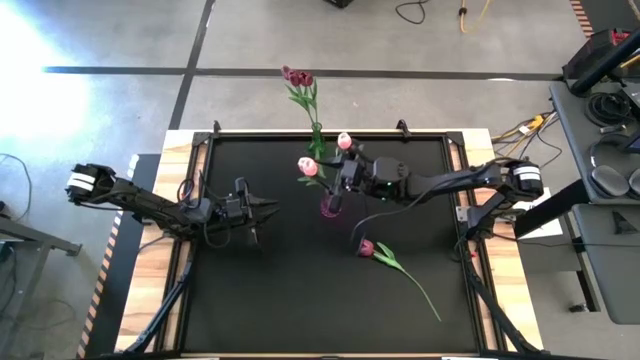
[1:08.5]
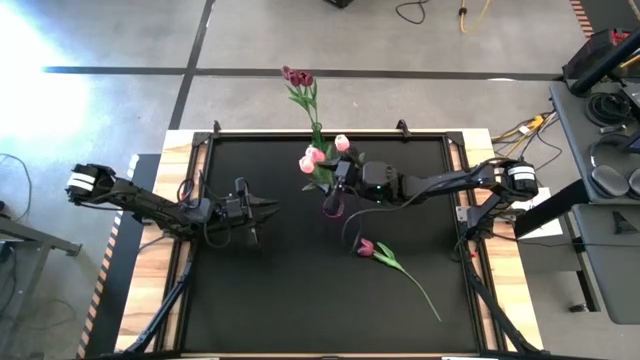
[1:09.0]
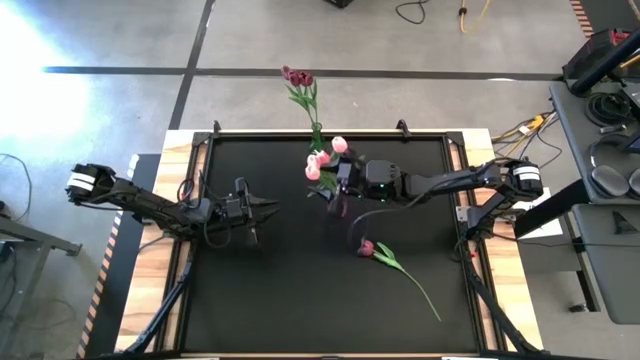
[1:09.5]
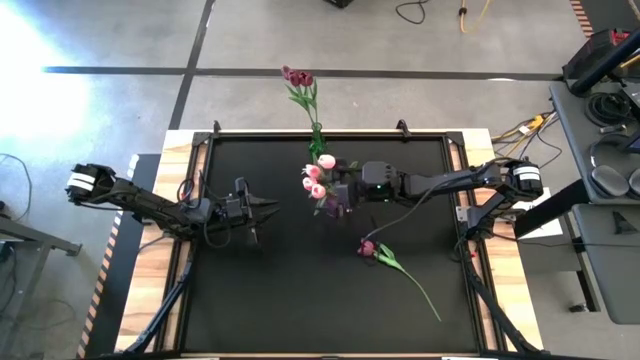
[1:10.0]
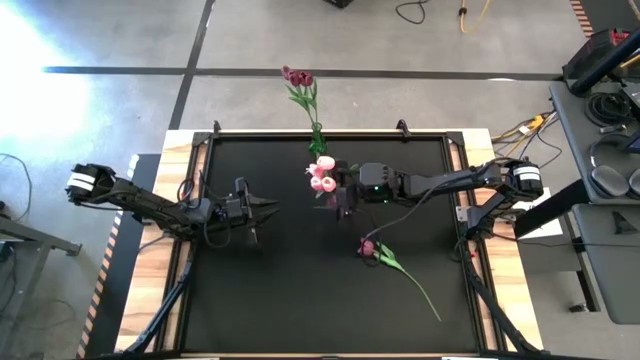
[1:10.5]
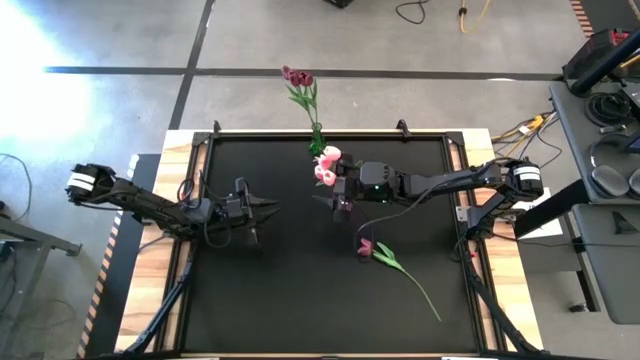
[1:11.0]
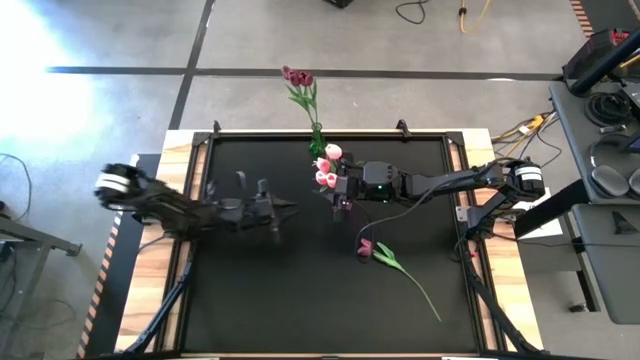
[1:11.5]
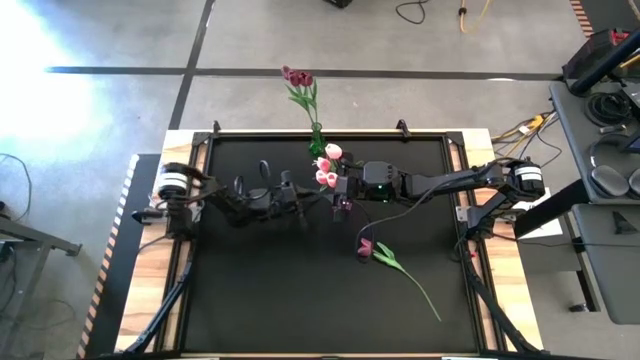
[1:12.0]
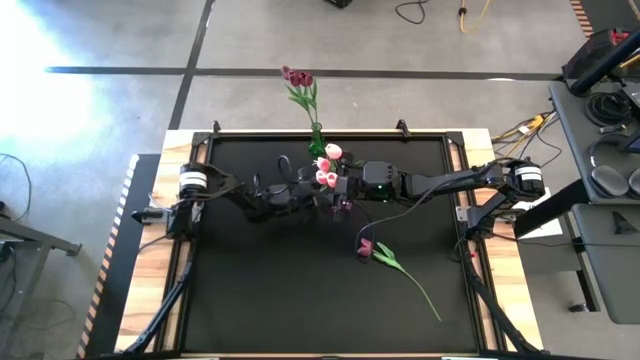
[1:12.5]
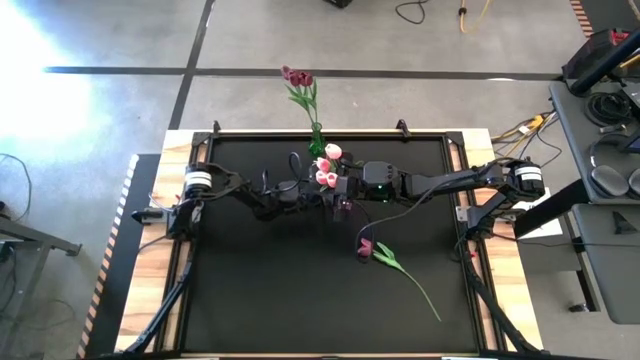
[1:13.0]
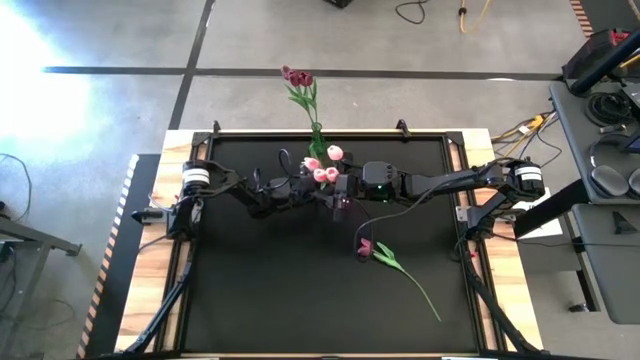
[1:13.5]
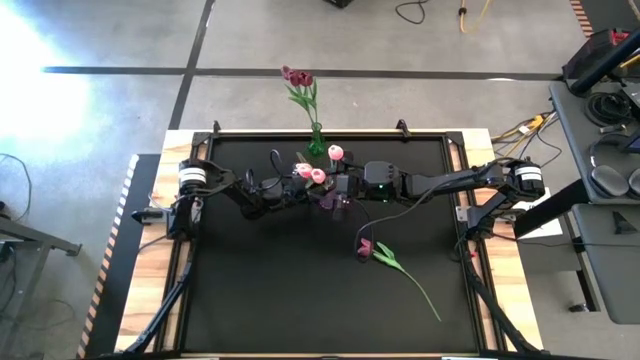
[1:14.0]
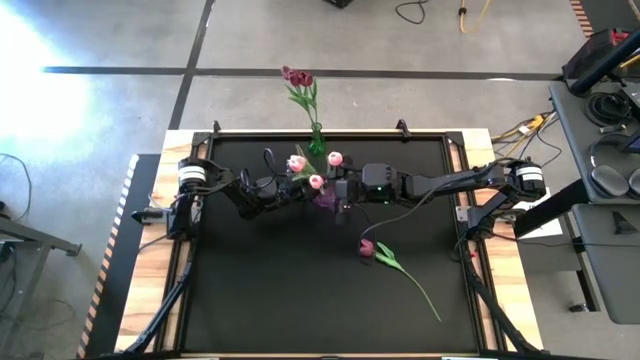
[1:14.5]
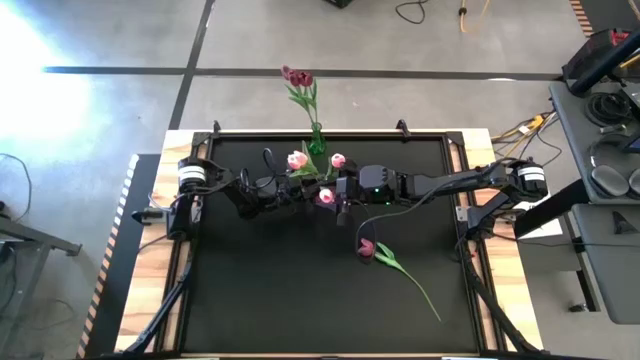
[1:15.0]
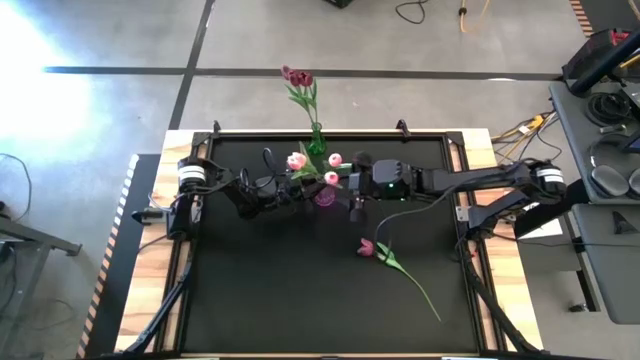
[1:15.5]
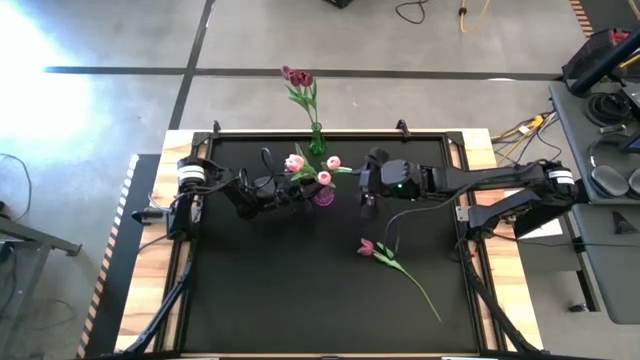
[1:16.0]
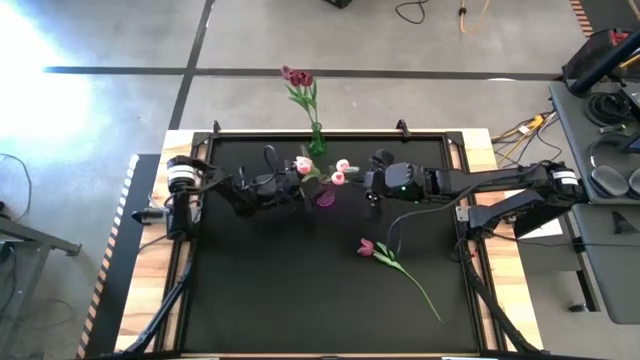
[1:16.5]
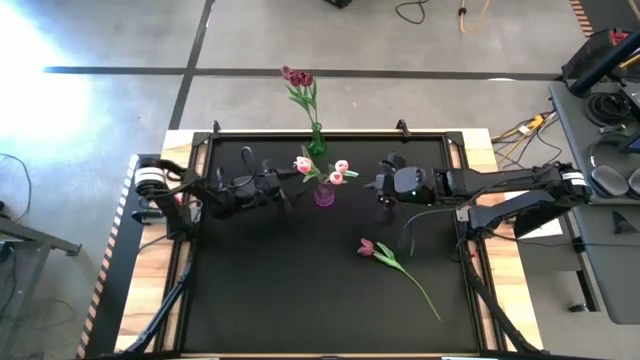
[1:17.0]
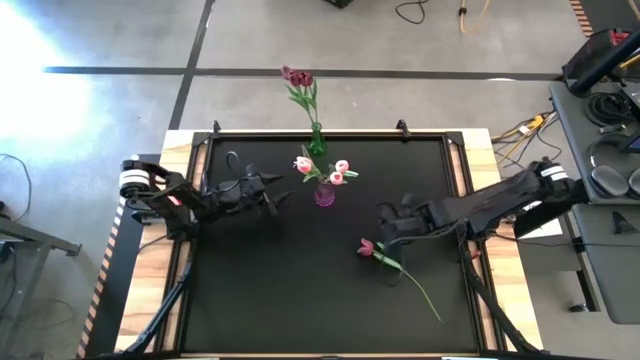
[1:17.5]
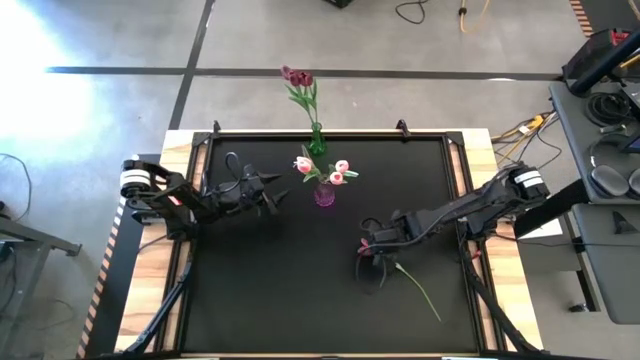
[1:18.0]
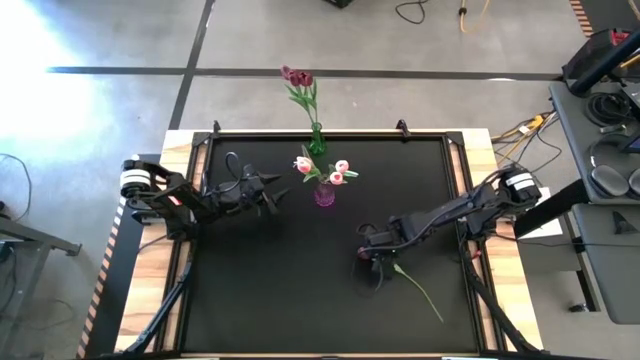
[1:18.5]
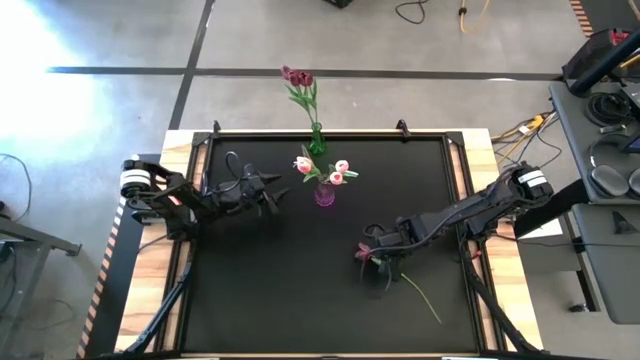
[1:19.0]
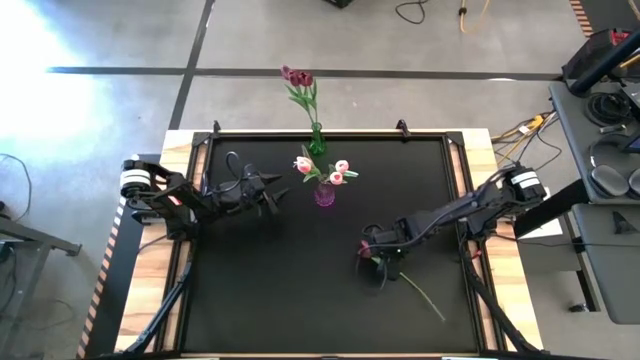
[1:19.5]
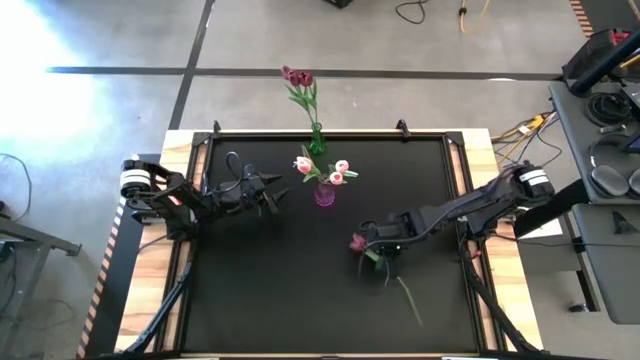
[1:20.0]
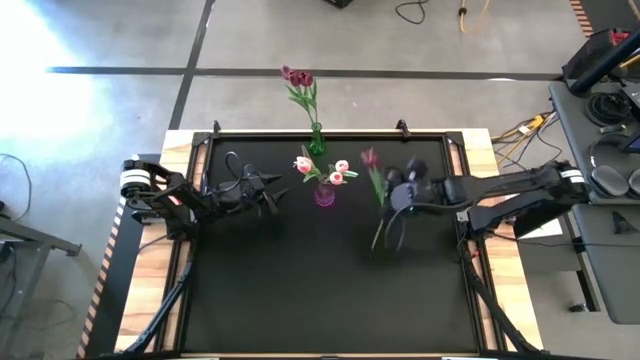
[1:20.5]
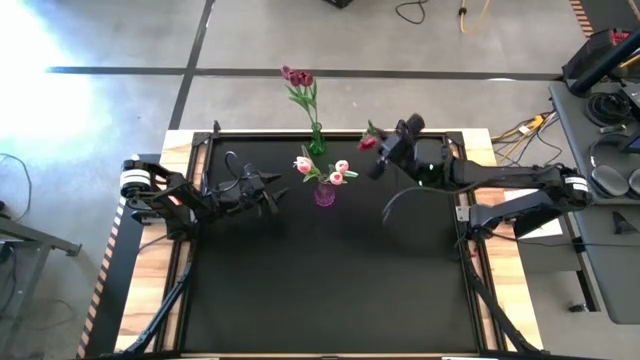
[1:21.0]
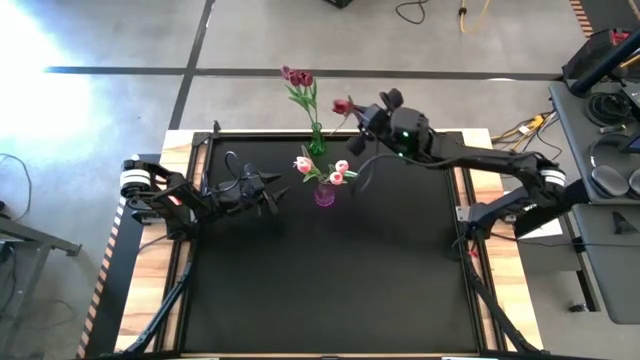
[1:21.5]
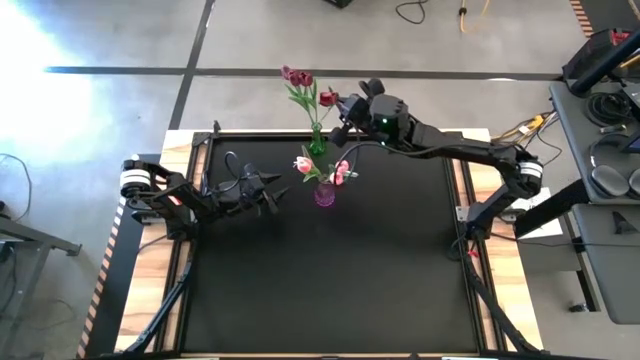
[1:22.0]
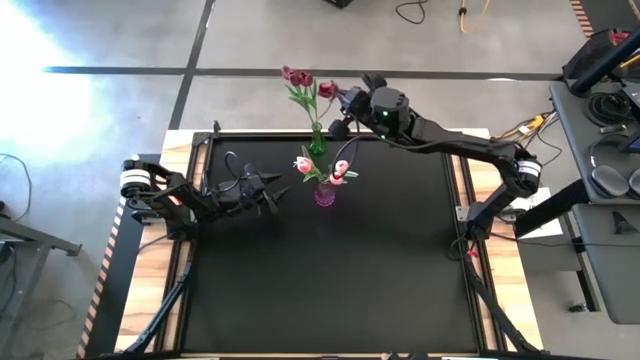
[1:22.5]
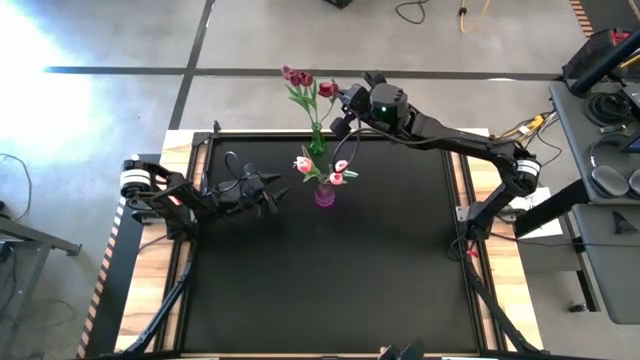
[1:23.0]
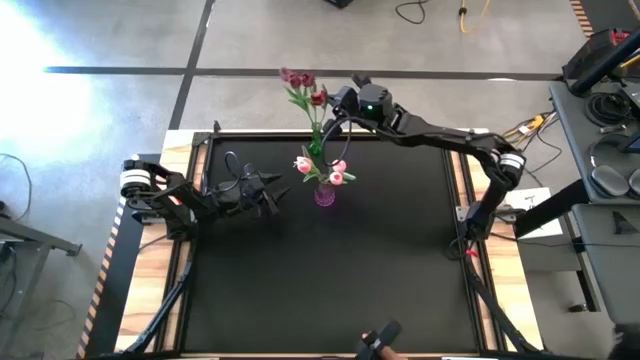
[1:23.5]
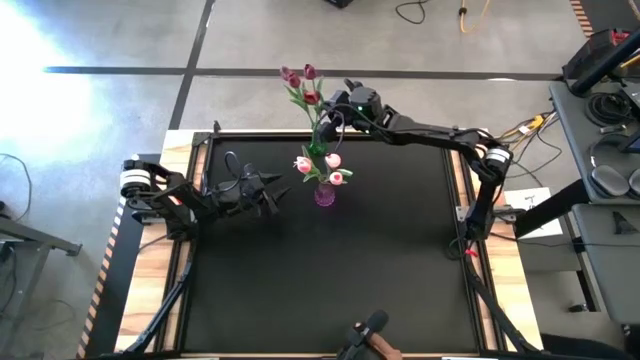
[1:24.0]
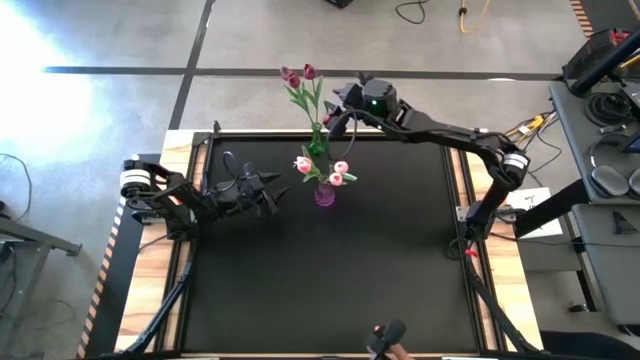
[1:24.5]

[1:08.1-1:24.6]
Task: Sort flowers into vase by color
Put the red flower into the green vase

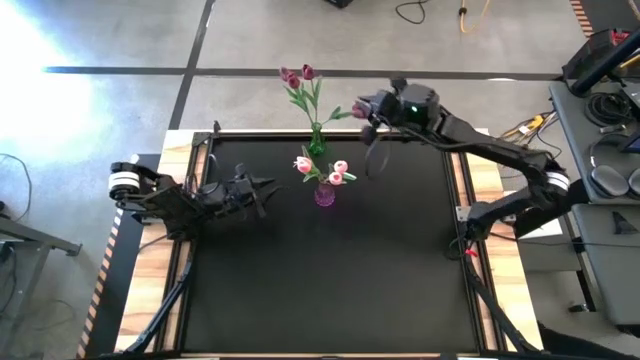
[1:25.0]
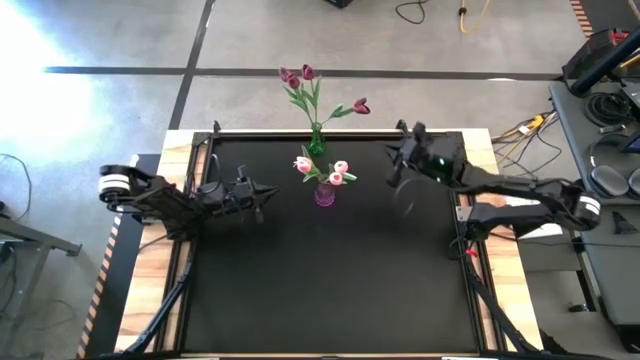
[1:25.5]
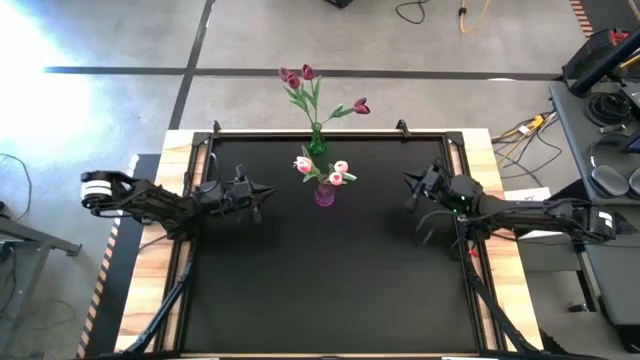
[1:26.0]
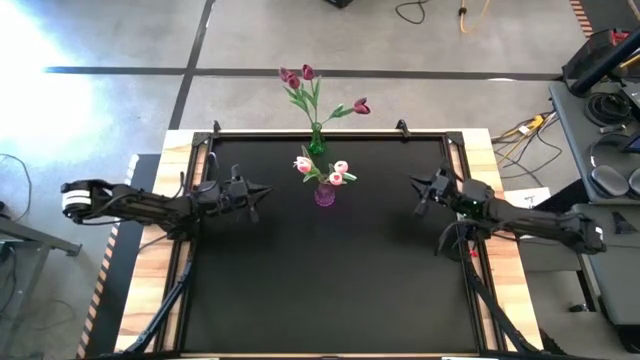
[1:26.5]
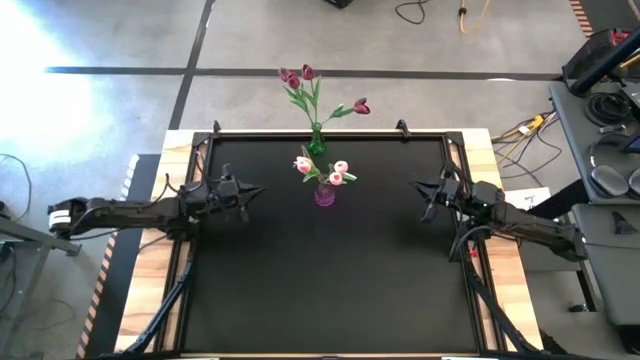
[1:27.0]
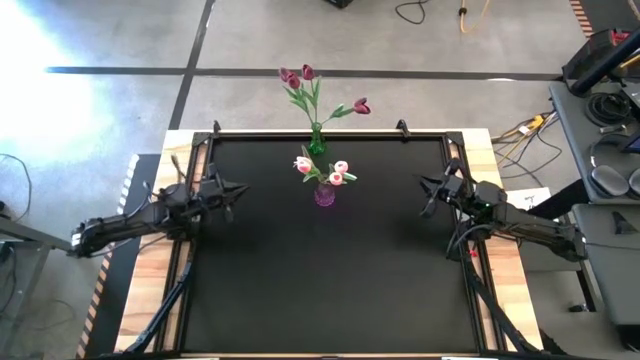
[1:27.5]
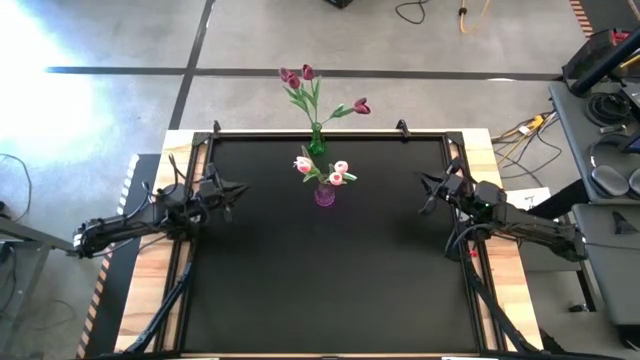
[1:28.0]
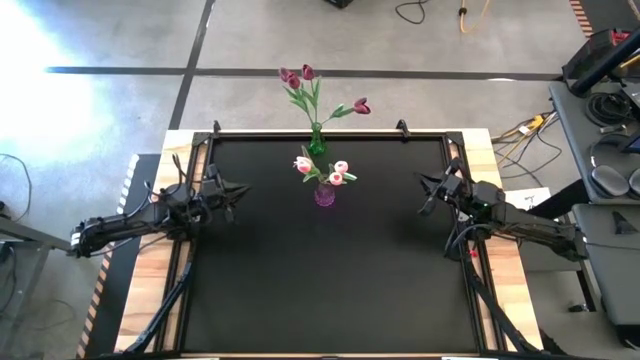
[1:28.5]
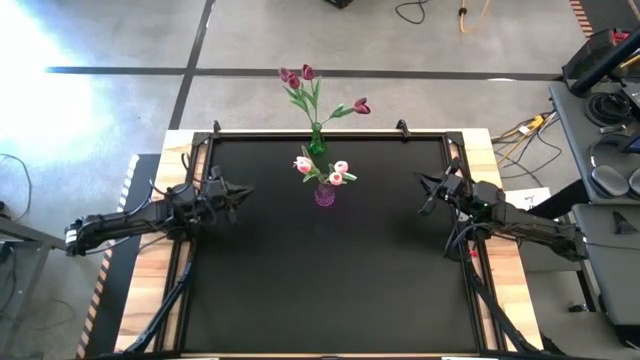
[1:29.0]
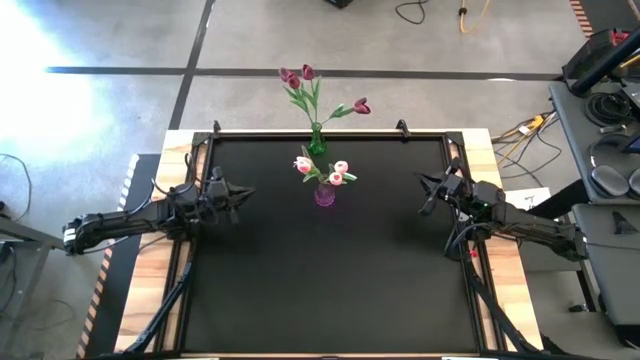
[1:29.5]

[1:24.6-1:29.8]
Return to Home Position
